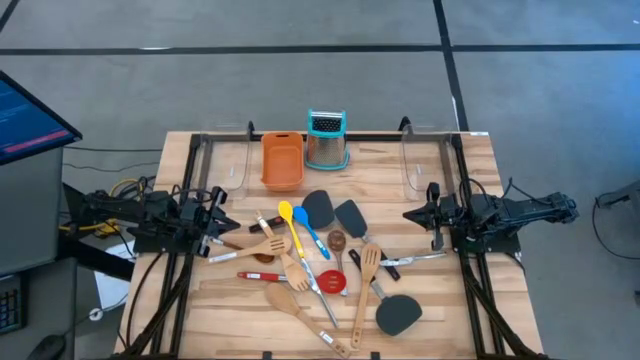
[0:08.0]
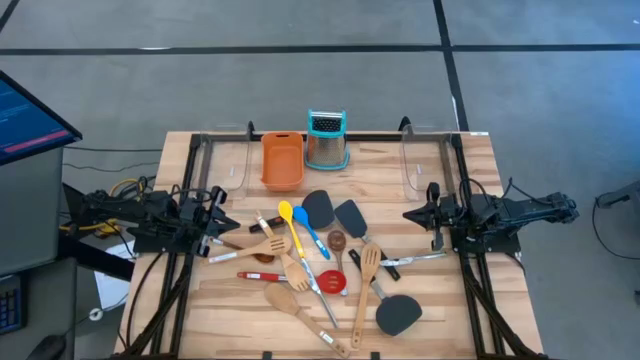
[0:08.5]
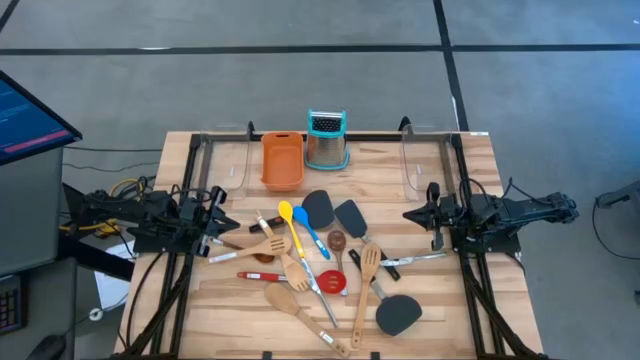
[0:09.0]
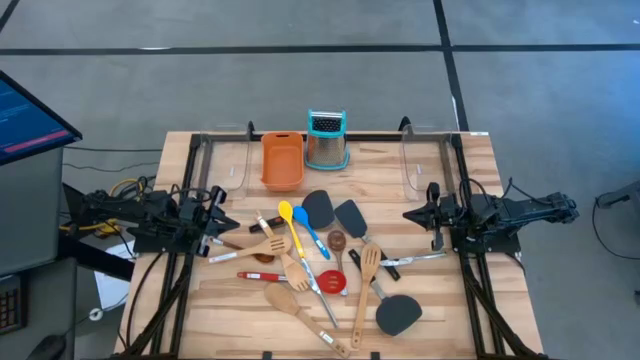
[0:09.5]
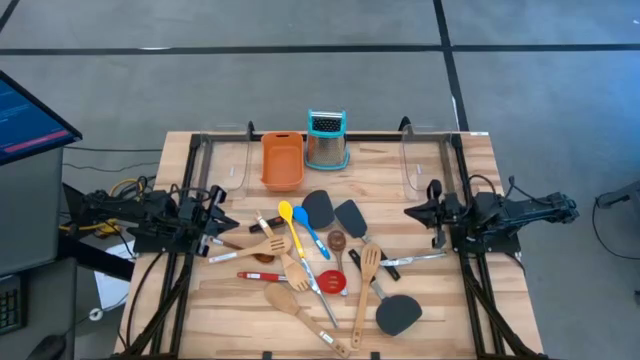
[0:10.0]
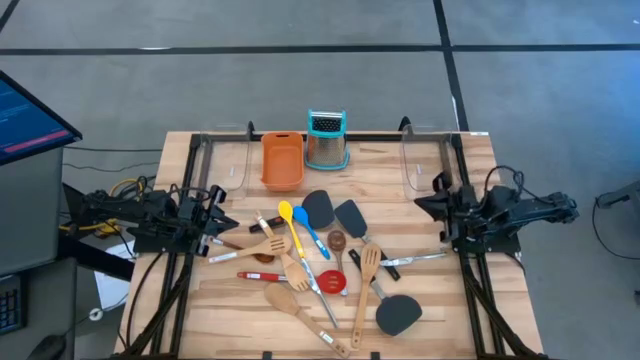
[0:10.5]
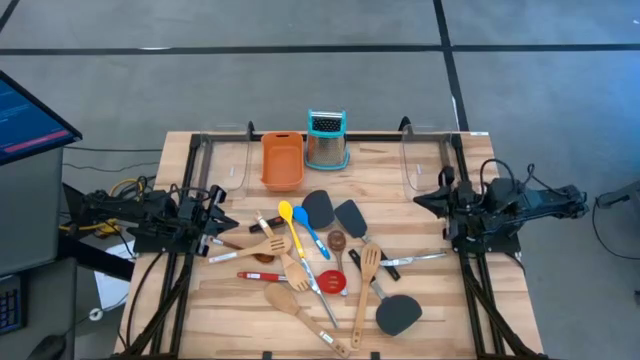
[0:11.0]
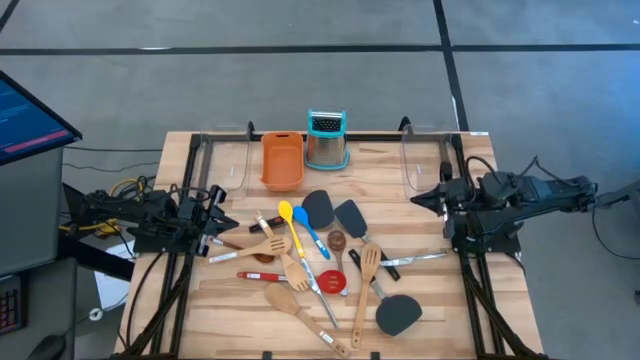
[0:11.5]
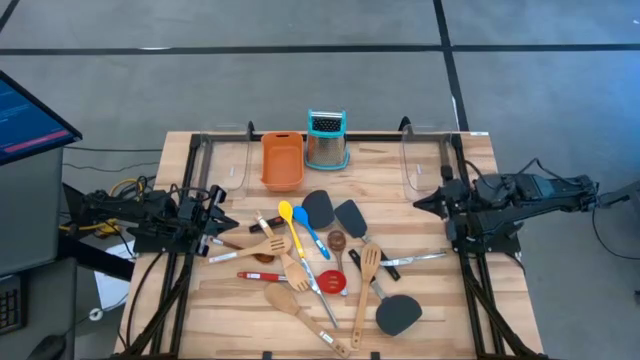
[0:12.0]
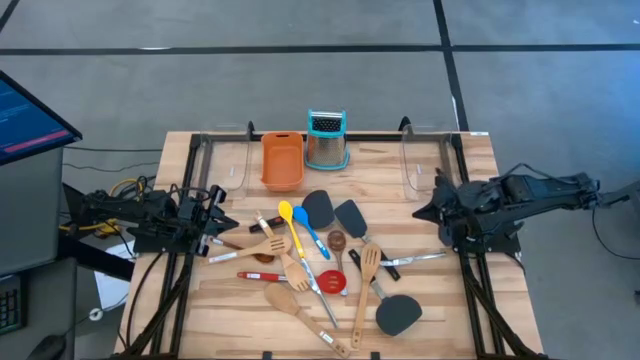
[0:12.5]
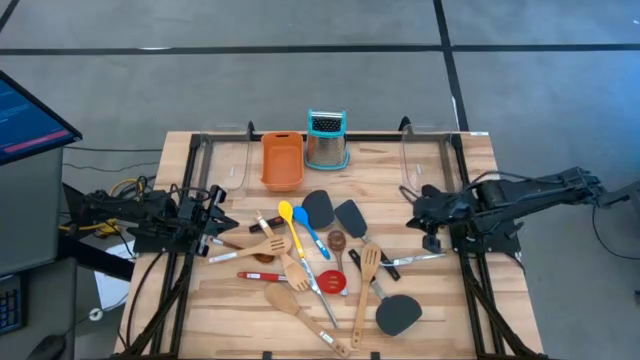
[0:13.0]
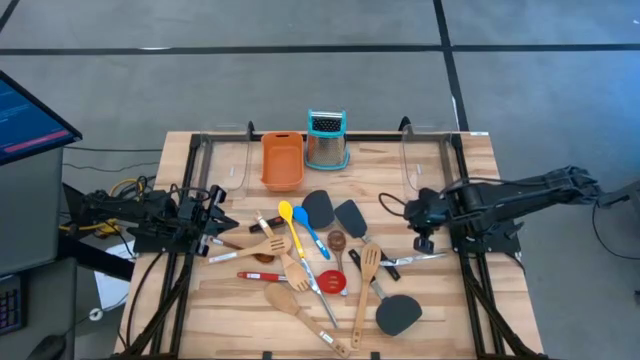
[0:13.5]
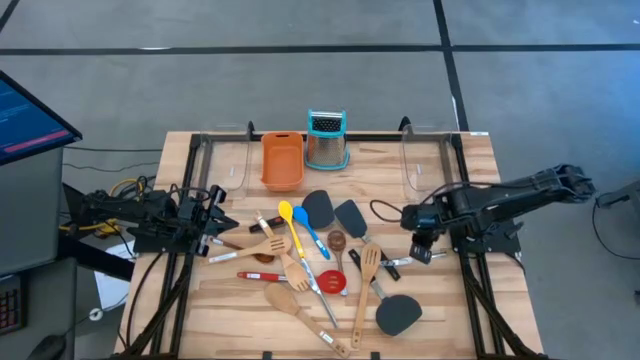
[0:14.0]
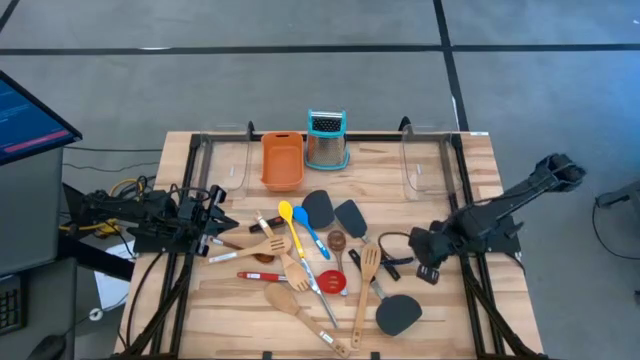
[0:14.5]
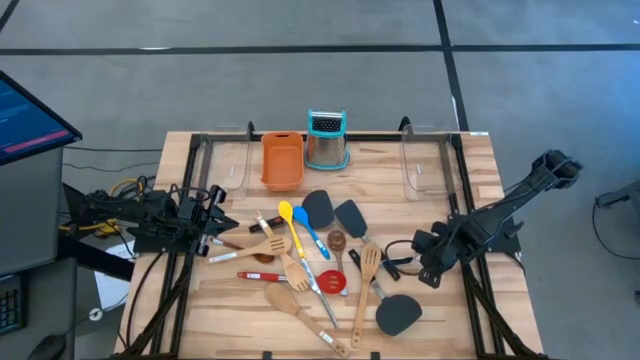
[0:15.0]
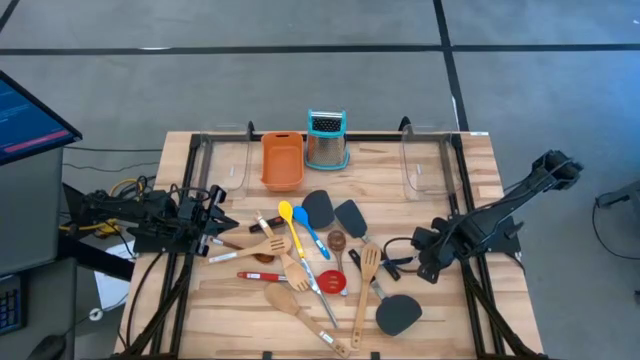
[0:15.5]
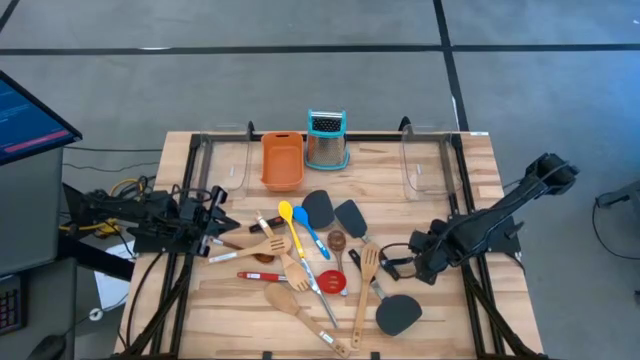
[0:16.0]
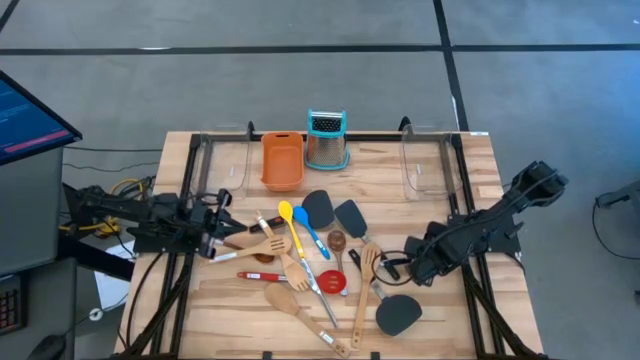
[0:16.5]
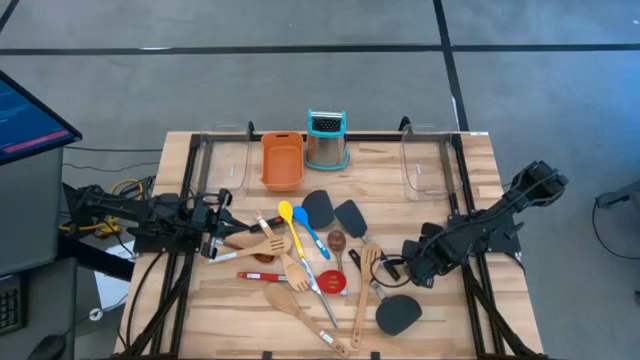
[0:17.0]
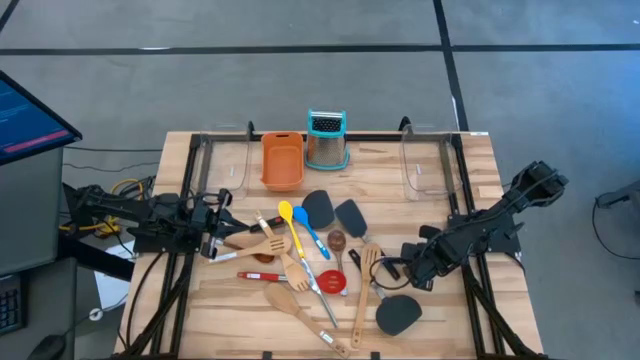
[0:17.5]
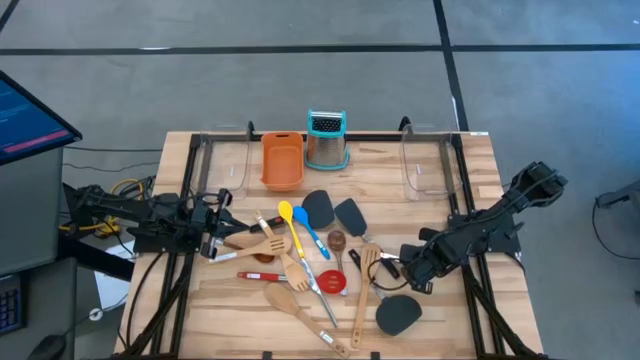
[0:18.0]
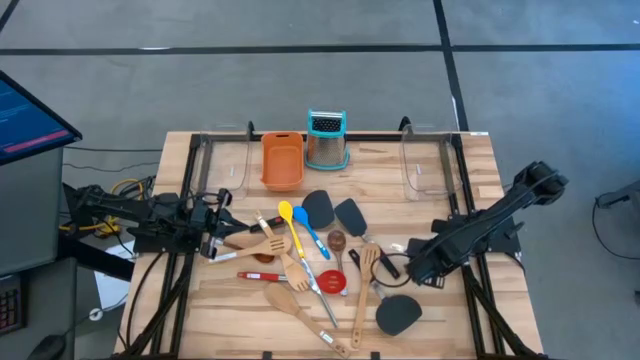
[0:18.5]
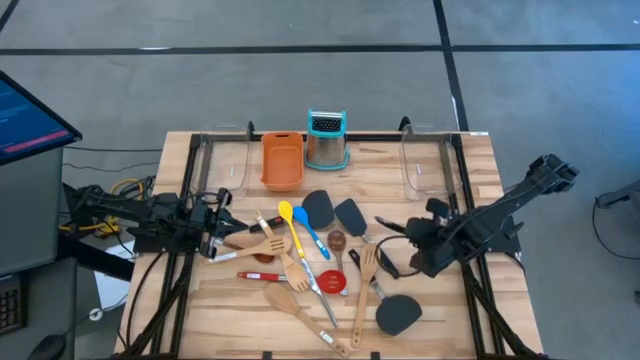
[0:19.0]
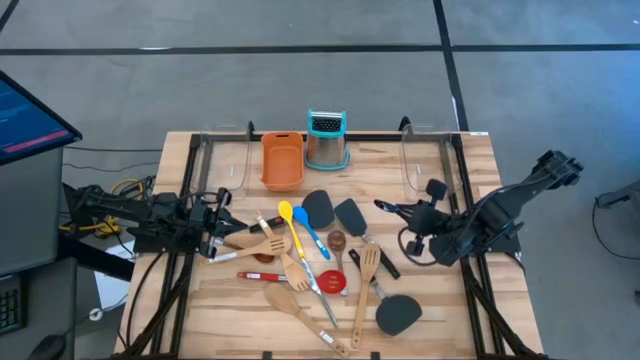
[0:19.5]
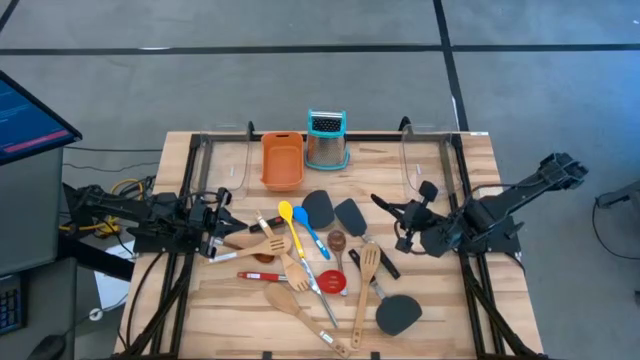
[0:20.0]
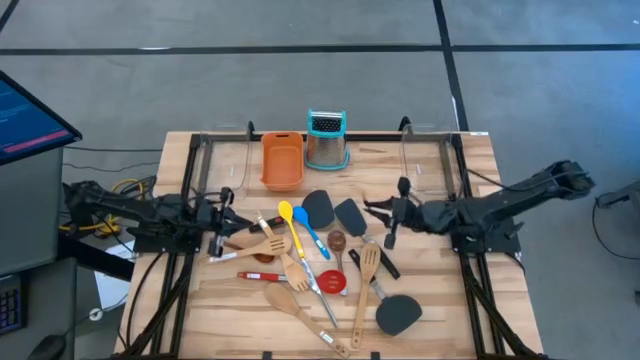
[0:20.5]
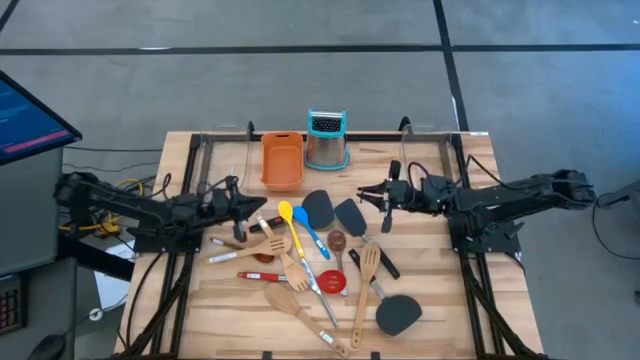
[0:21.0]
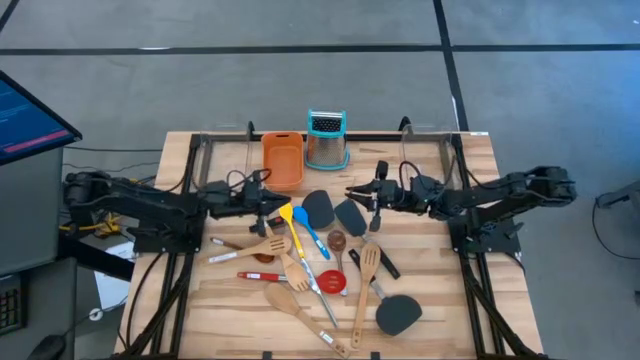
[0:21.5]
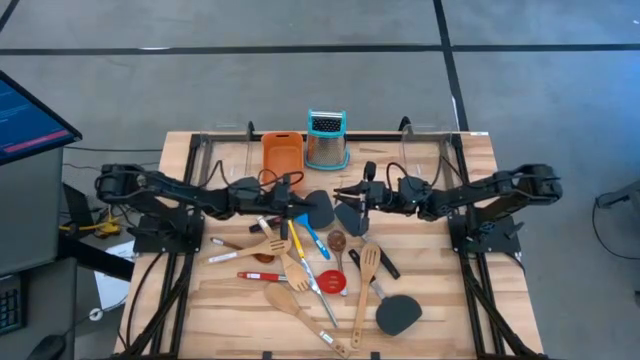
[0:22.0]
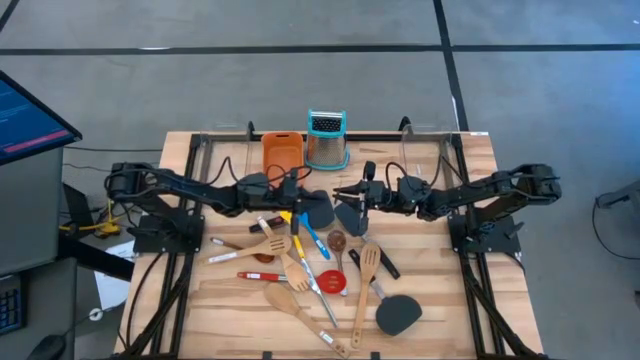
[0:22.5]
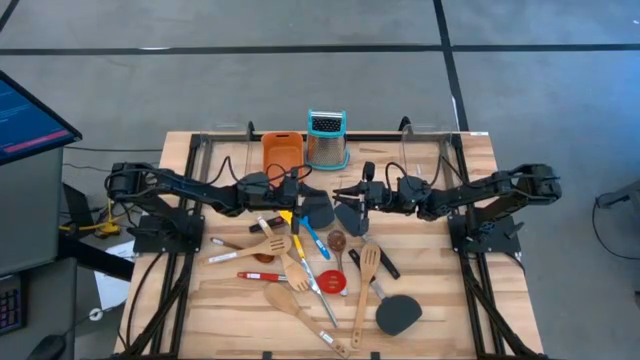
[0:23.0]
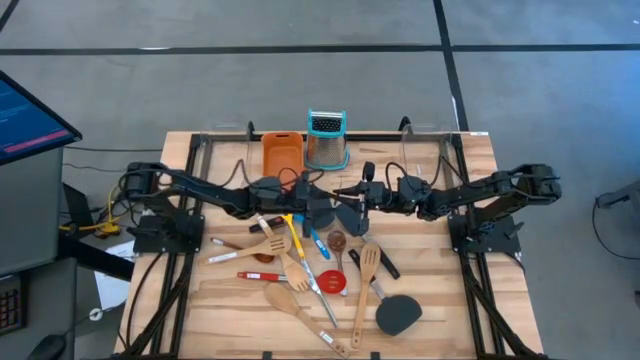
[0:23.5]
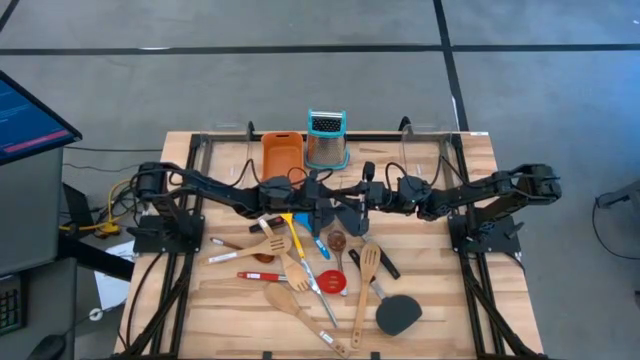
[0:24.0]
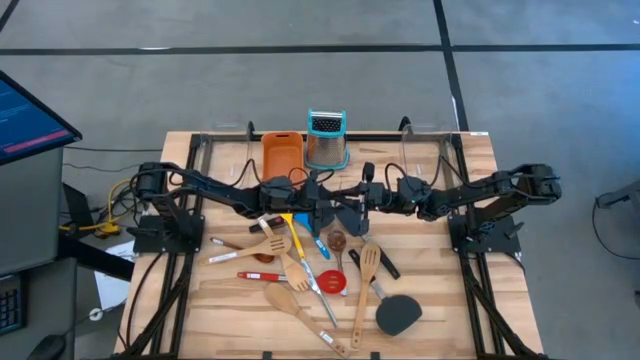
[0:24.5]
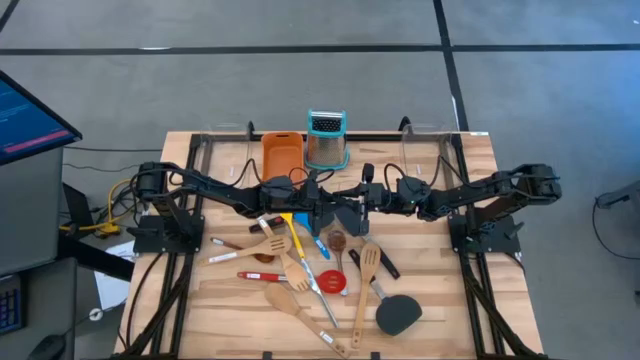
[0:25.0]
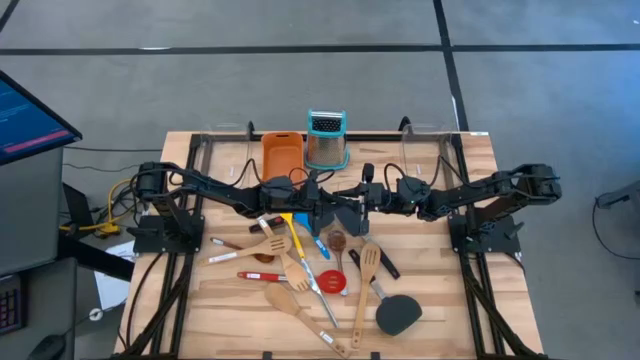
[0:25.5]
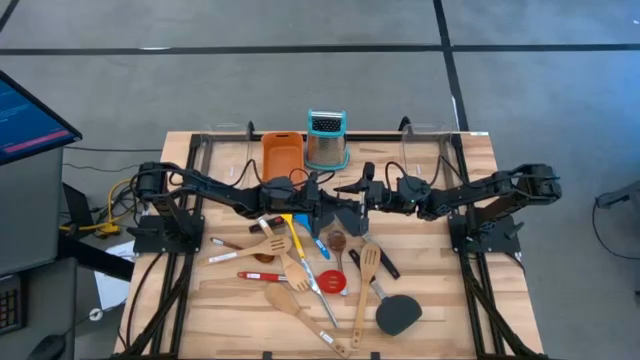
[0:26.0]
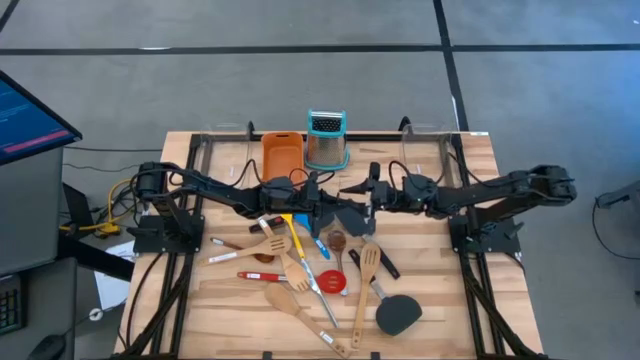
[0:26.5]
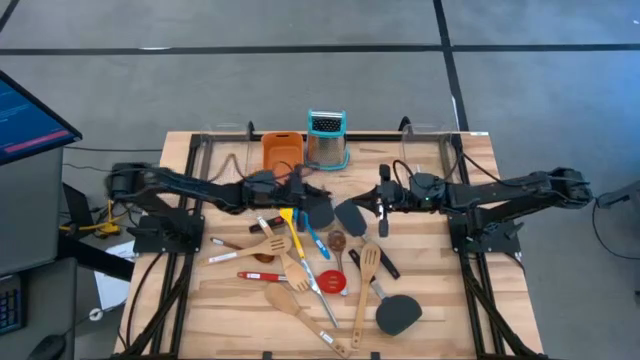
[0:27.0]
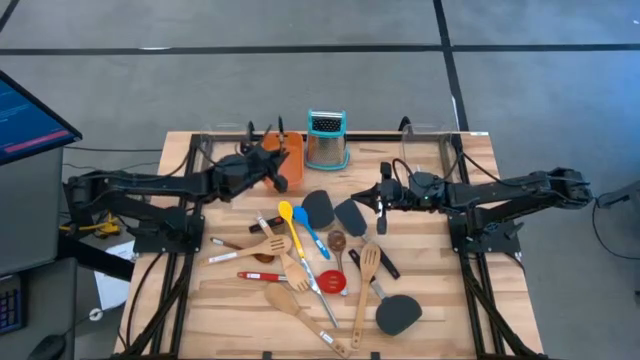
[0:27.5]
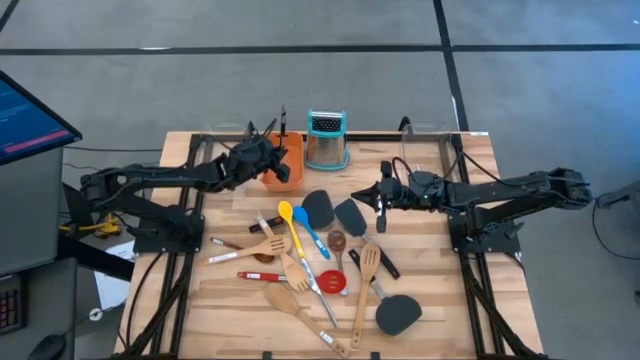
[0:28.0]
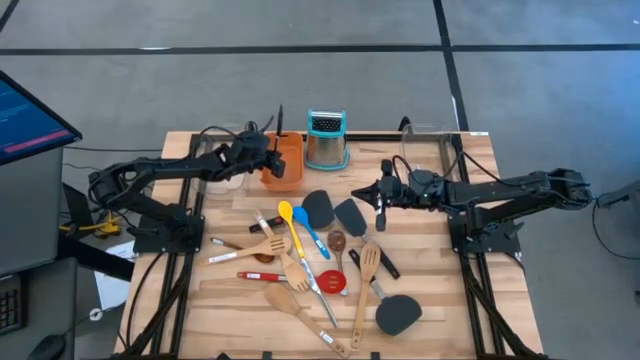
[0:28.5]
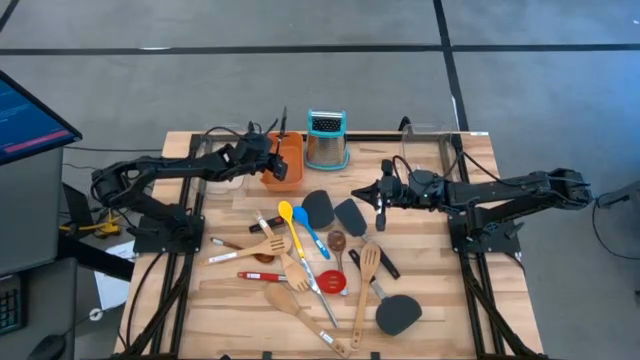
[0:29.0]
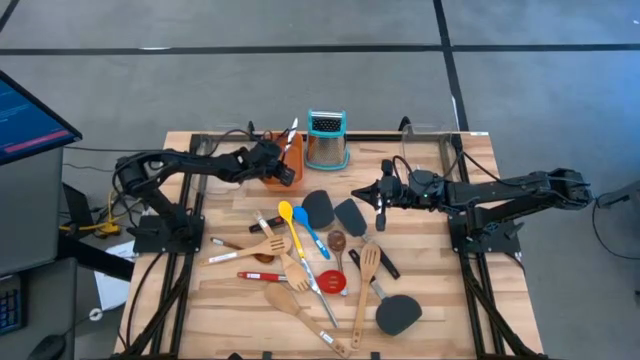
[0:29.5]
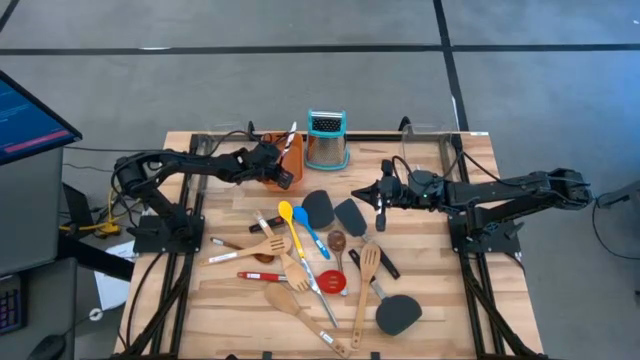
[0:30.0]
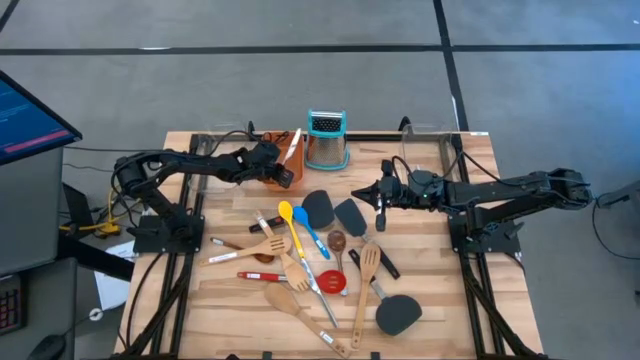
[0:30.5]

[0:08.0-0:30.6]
Task: Pick & Place Kitchen Items
Put the silver knife into the orange bin
